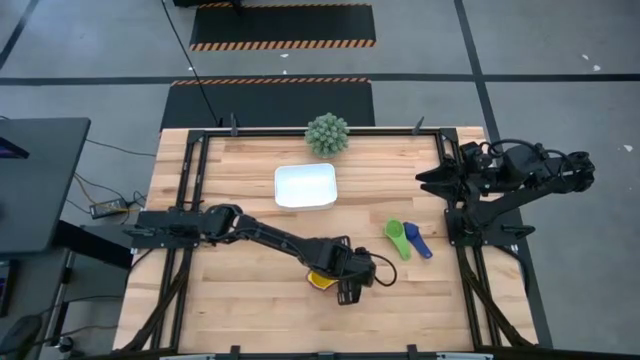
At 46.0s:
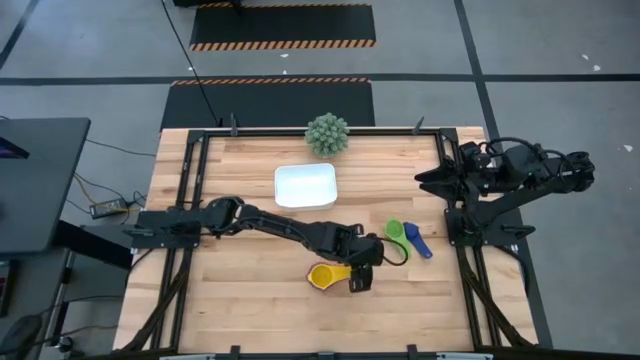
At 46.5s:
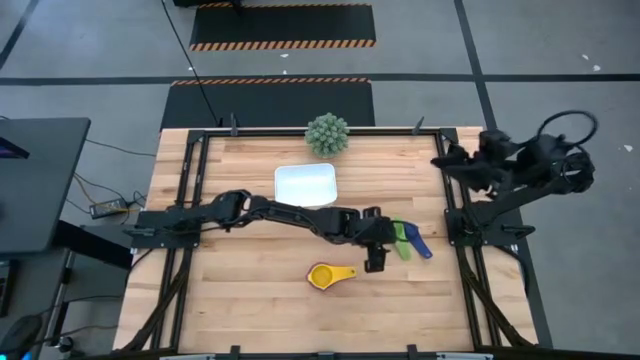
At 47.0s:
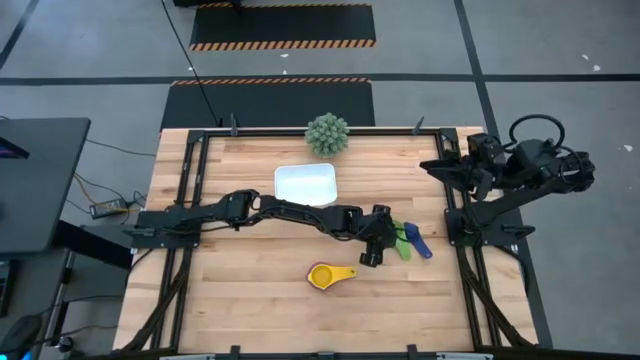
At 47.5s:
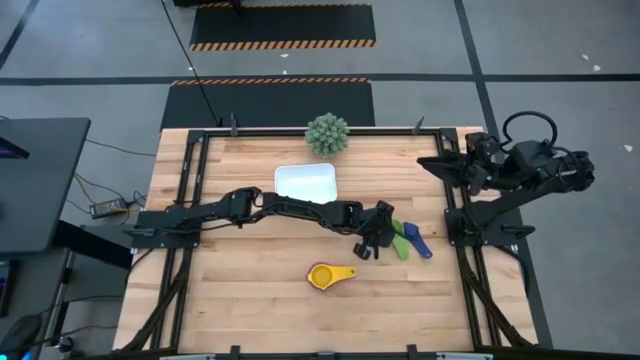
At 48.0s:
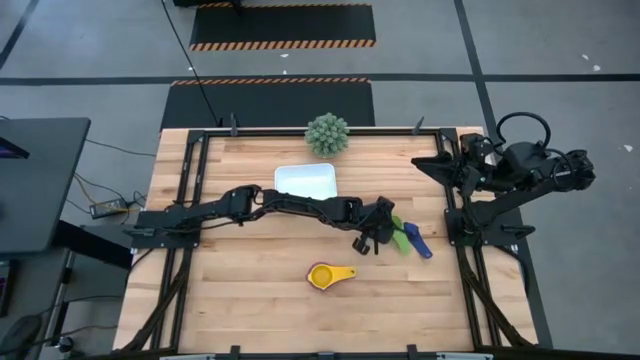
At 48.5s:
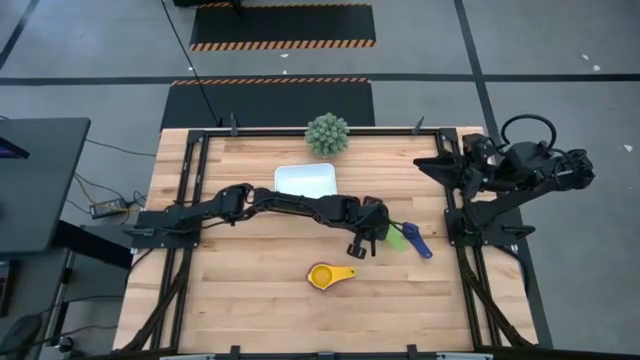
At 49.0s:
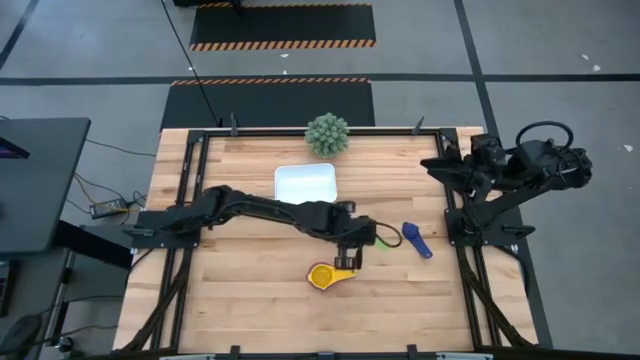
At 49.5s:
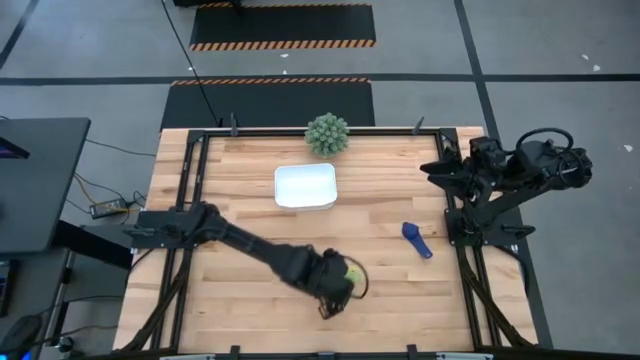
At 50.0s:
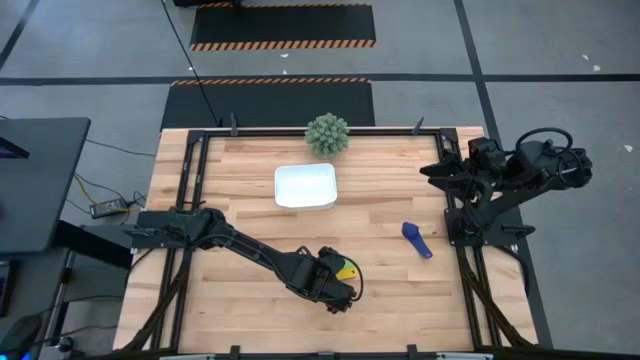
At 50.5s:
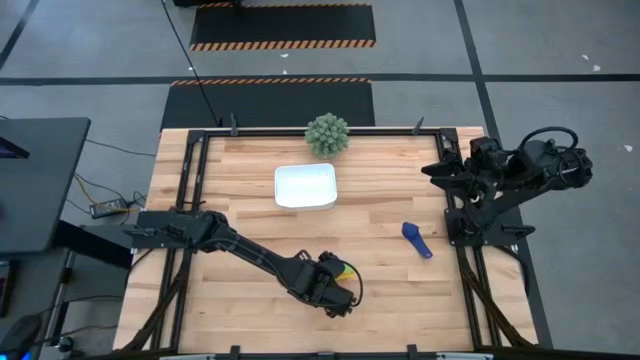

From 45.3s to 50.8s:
Task: Nest measuring cups in basket
Stack the green measuring cup into the yellow measuring cup

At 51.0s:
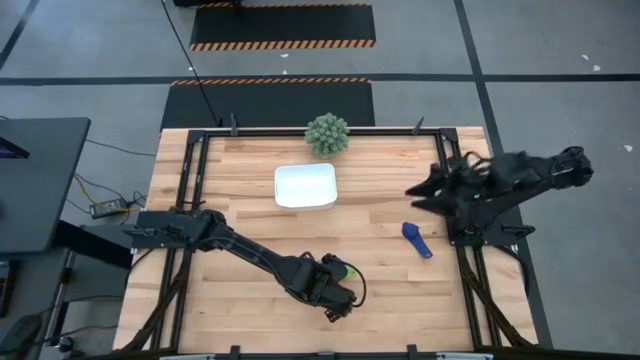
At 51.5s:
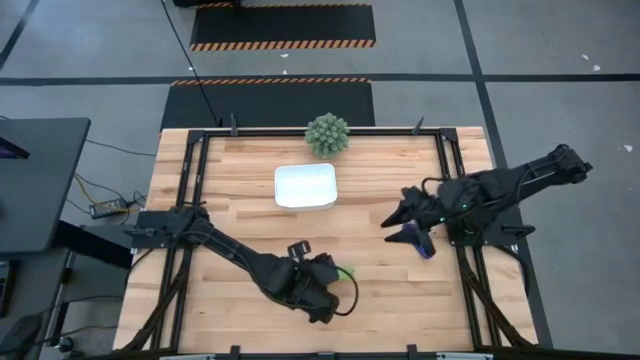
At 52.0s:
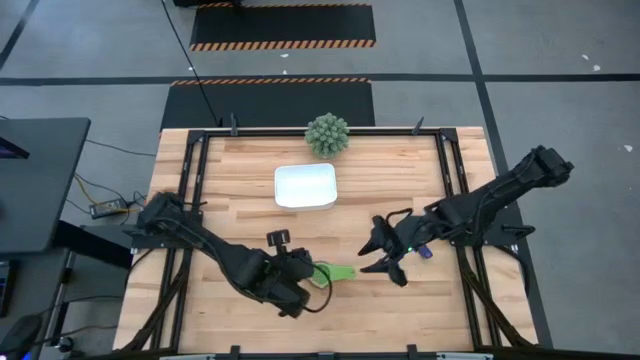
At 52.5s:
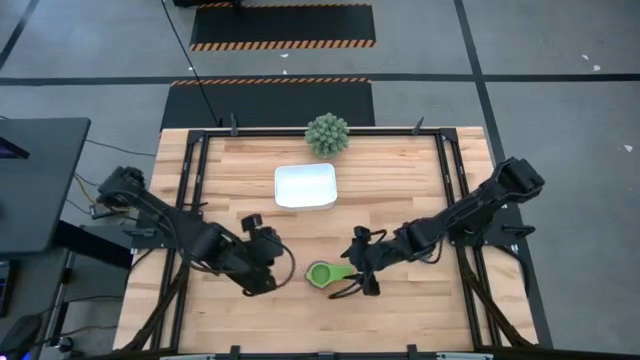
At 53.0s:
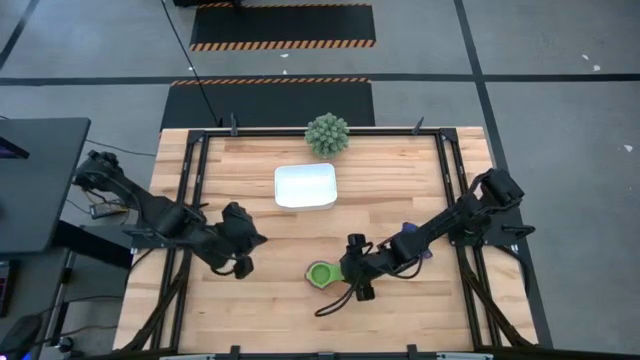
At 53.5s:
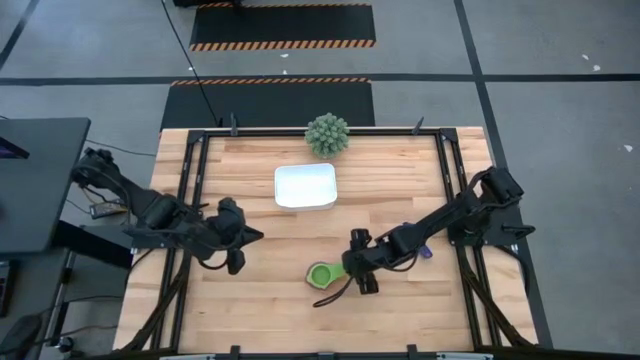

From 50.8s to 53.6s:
Adjust the stacked measuring cups

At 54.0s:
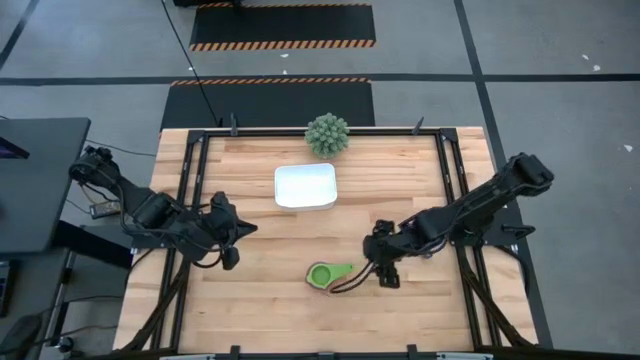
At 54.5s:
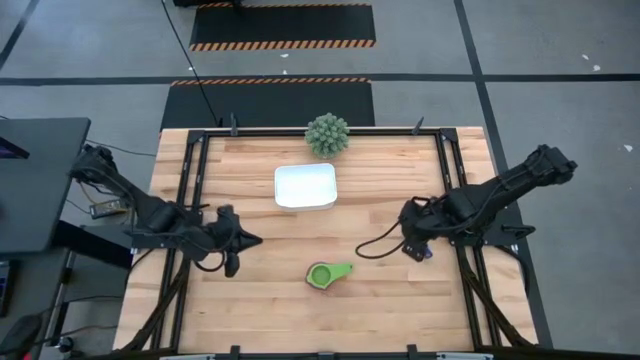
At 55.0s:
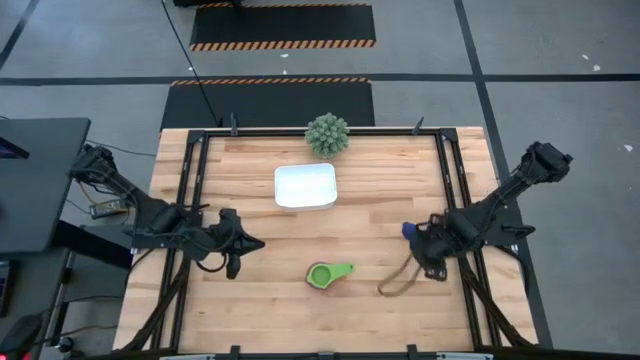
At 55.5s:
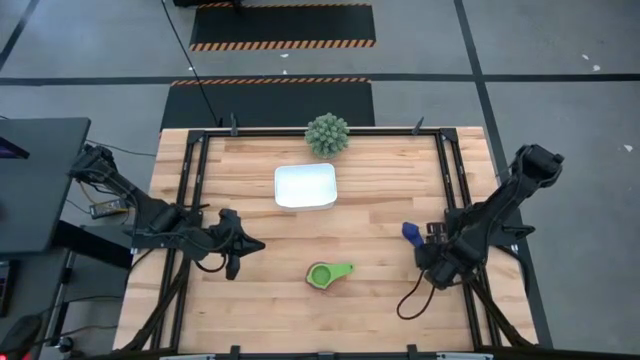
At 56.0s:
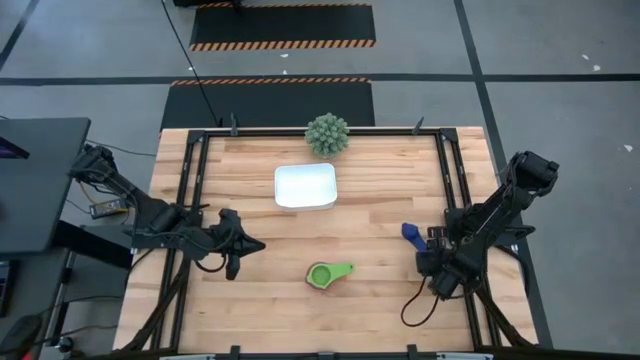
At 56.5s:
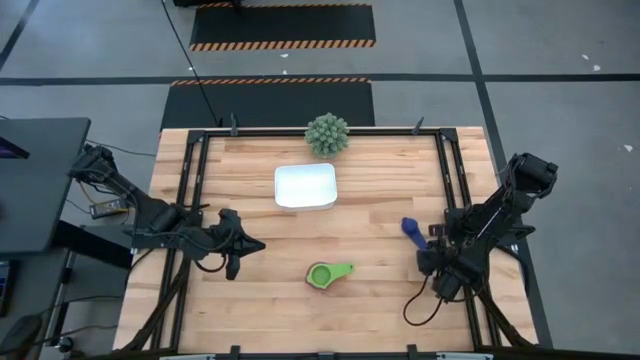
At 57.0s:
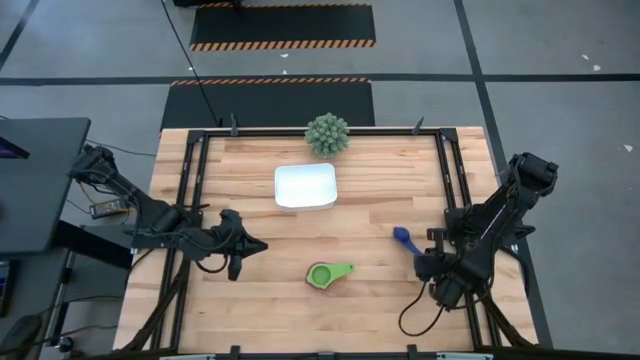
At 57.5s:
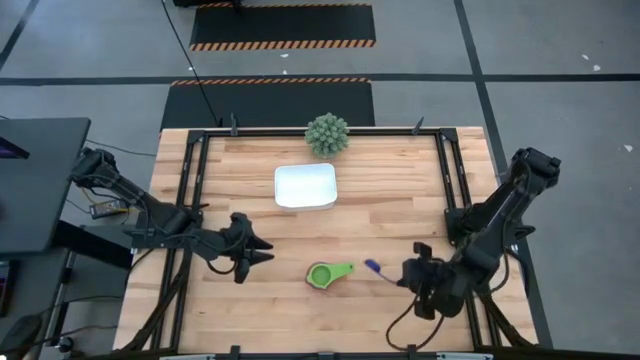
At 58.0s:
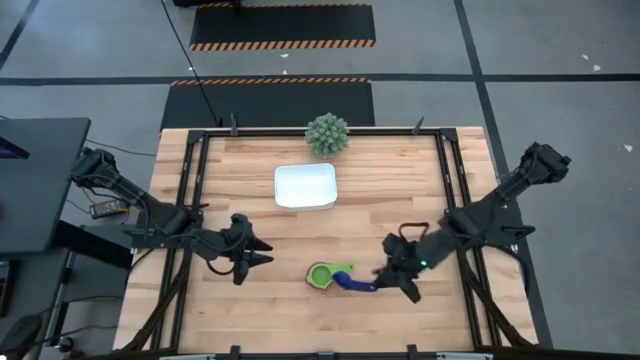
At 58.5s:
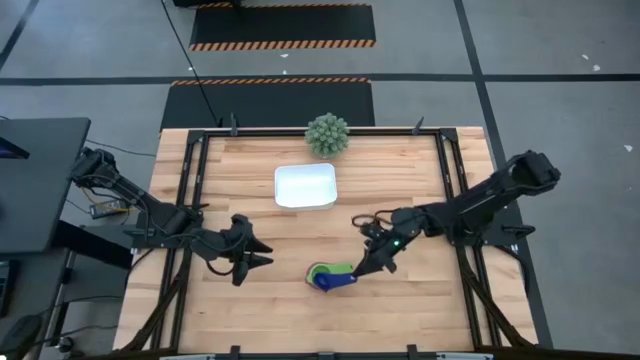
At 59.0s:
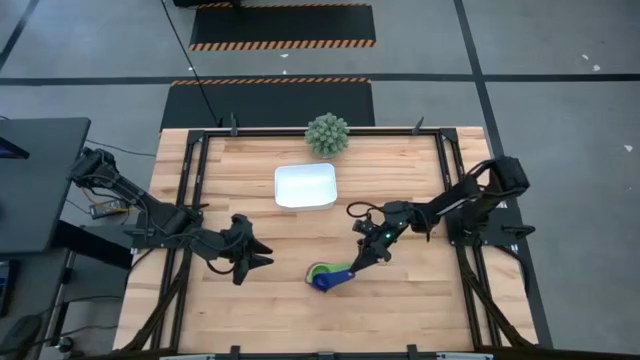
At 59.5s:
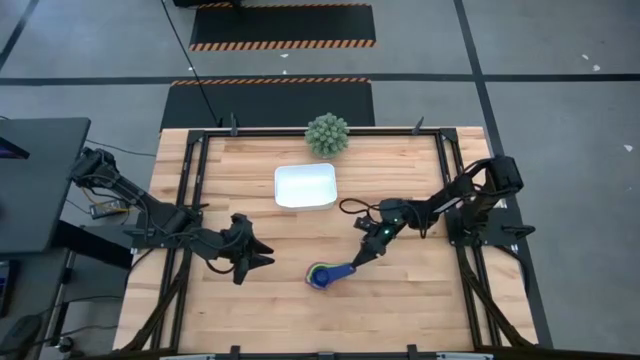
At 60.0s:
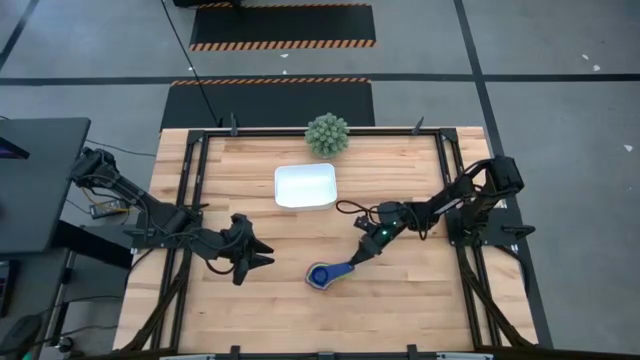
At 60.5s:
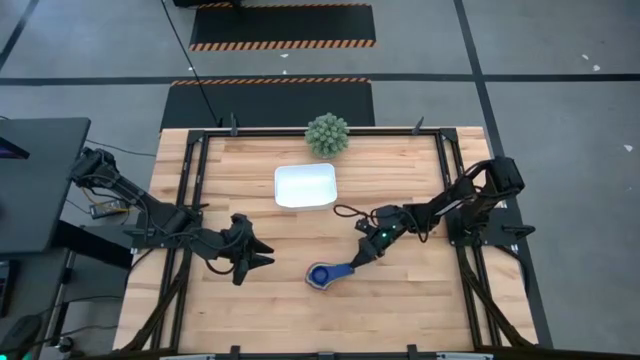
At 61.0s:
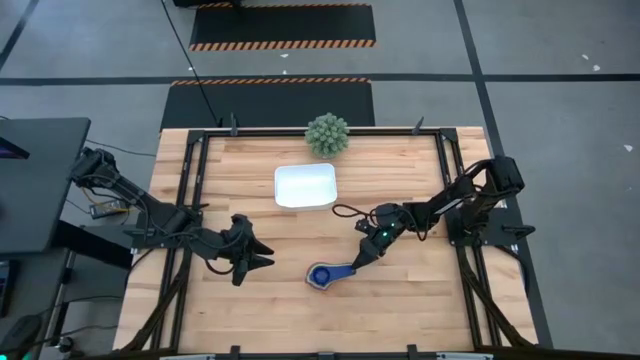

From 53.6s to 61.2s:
Stack the dark blue measuring cup into the green measuring cup

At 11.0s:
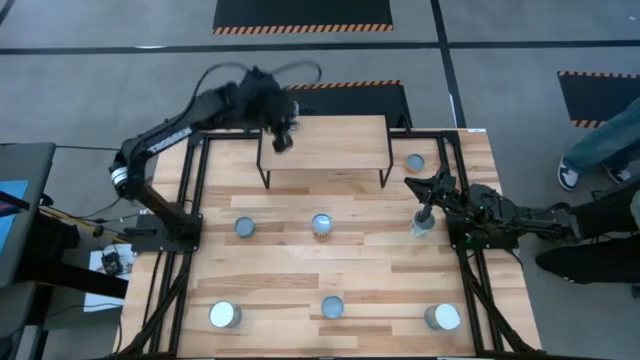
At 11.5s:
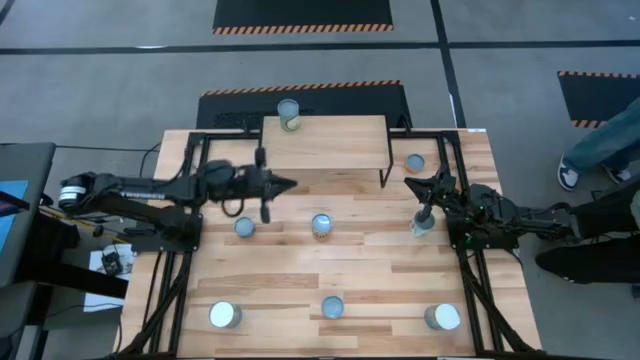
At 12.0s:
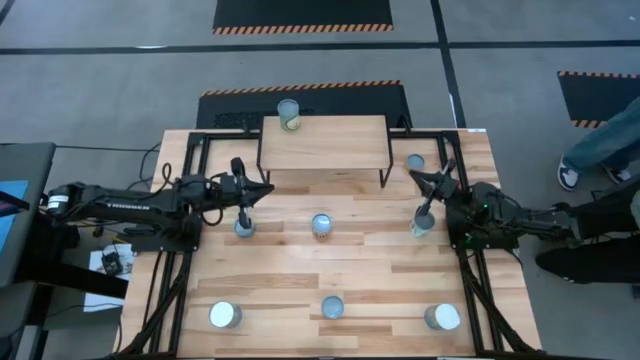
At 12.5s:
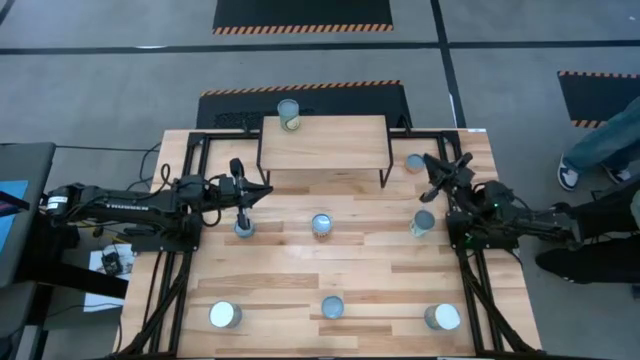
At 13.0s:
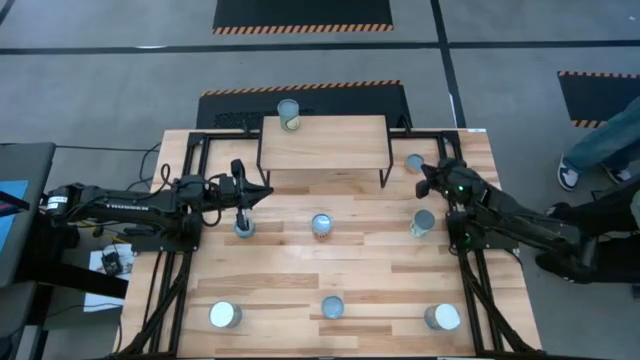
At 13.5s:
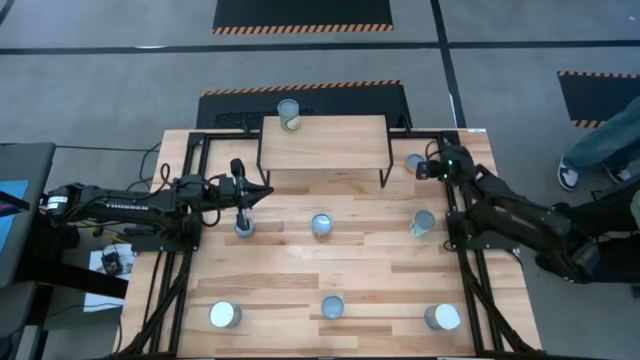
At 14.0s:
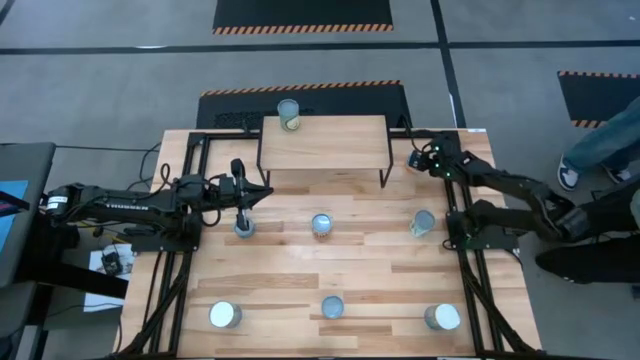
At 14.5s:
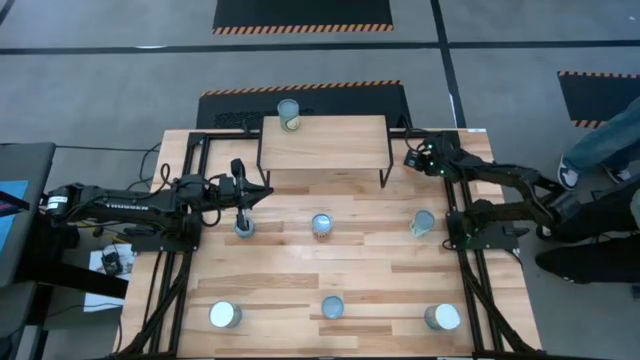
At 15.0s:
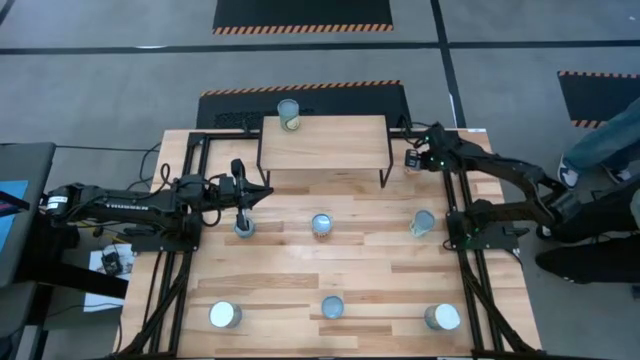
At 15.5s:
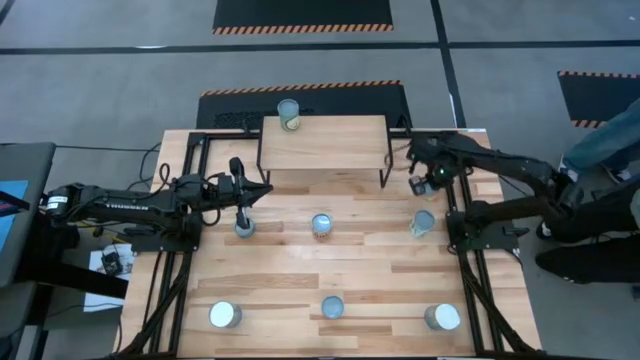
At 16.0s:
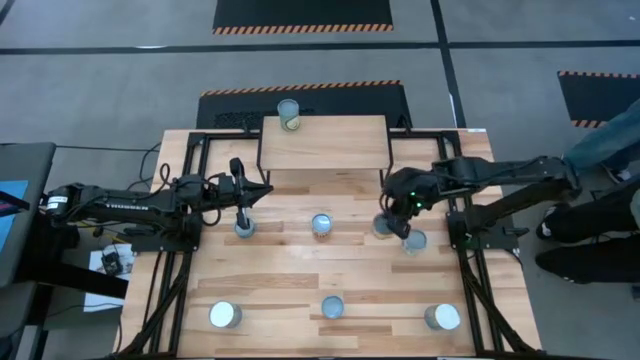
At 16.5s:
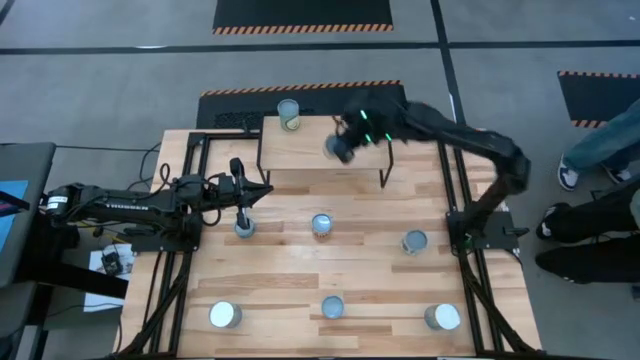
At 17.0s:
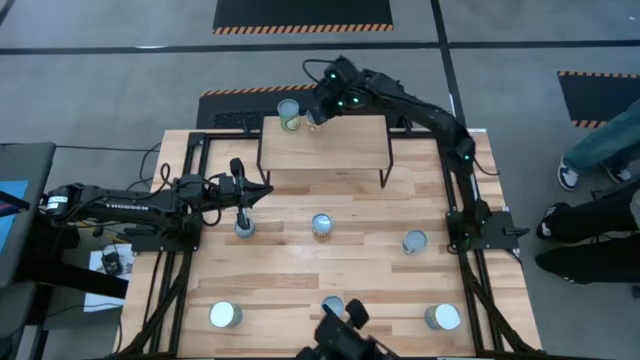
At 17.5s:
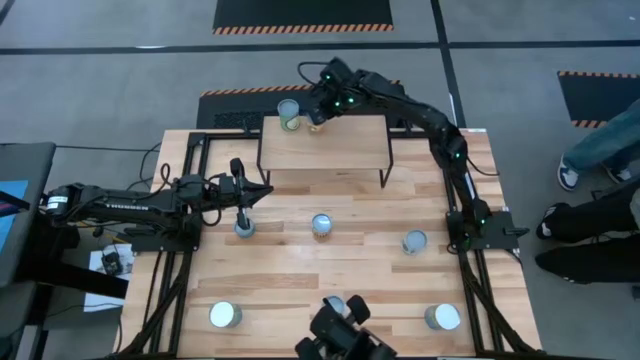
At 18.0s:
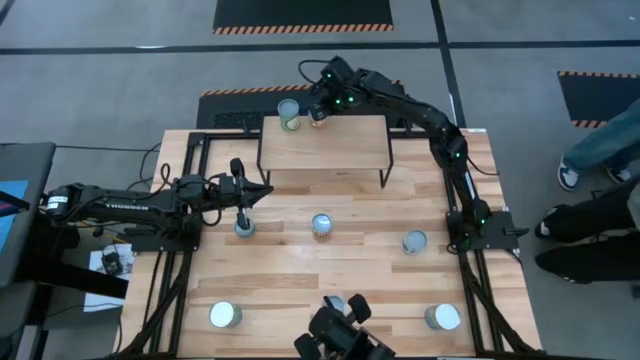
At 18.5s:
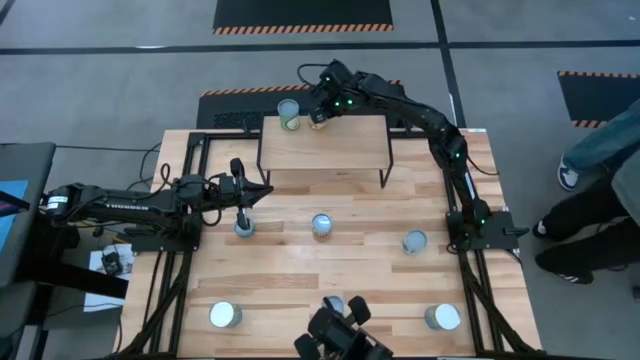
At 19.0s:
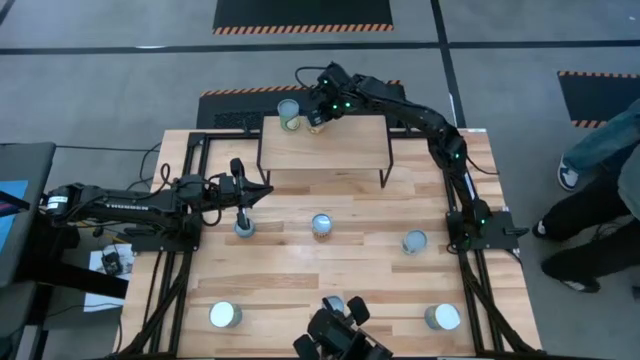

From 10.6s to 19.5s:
Task: Pick and place cans onto a shelf
Put the yellow mushroom can on the shelf
